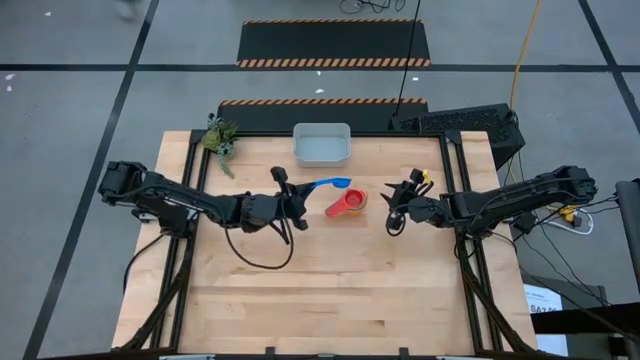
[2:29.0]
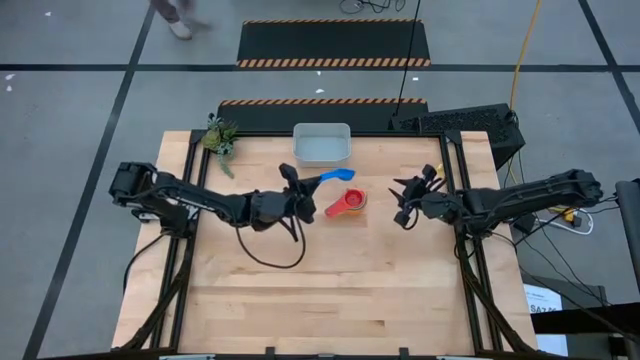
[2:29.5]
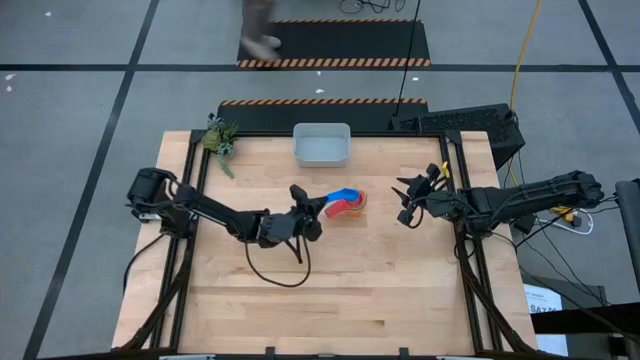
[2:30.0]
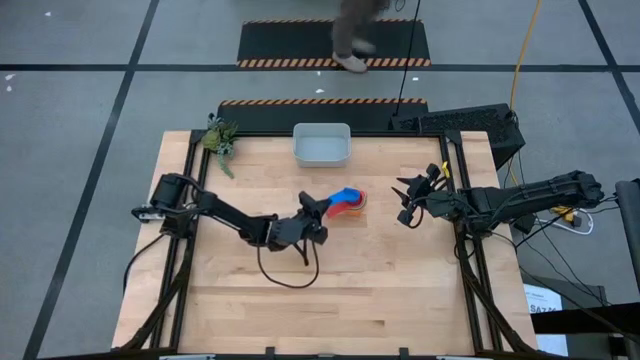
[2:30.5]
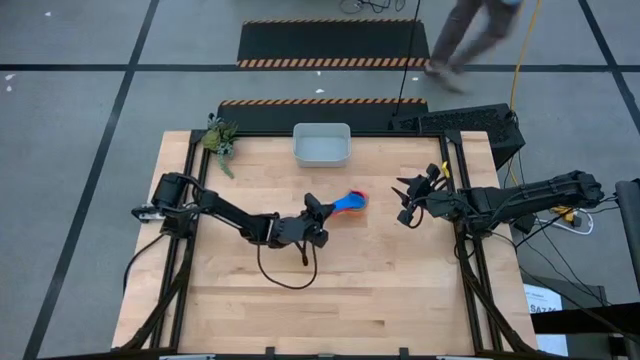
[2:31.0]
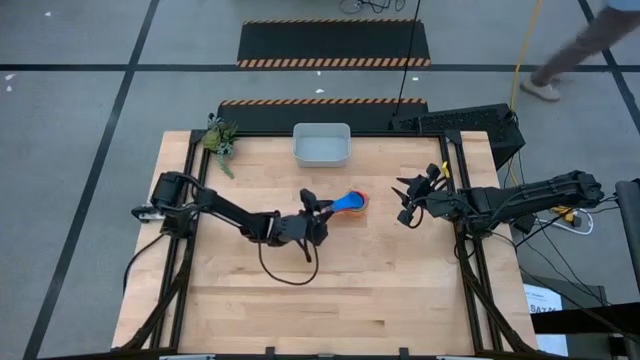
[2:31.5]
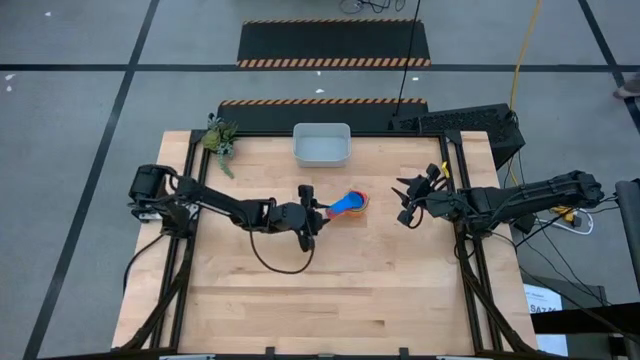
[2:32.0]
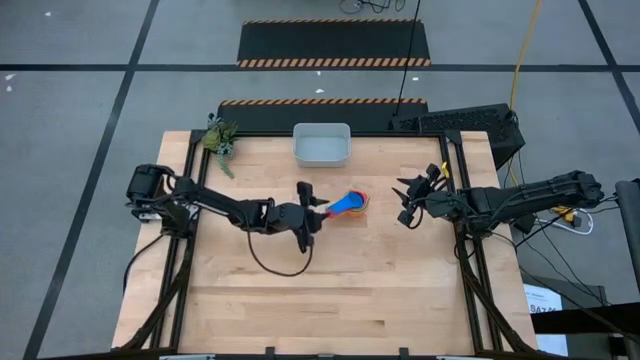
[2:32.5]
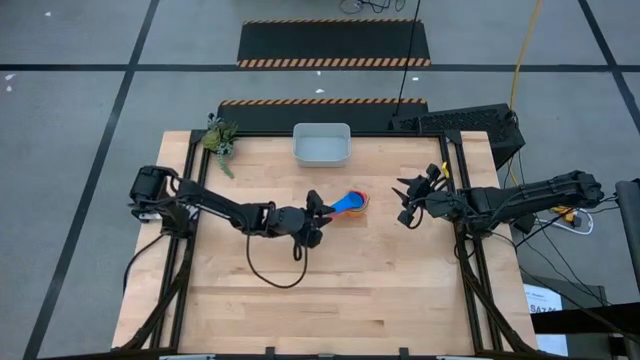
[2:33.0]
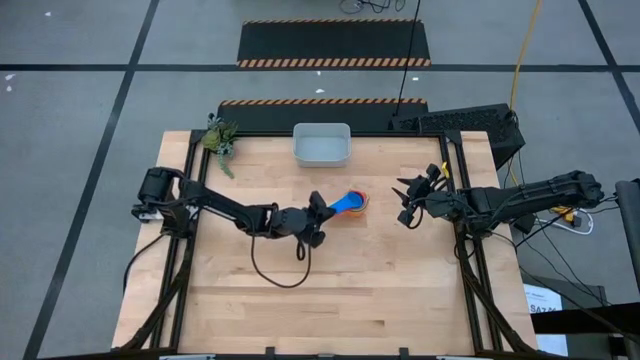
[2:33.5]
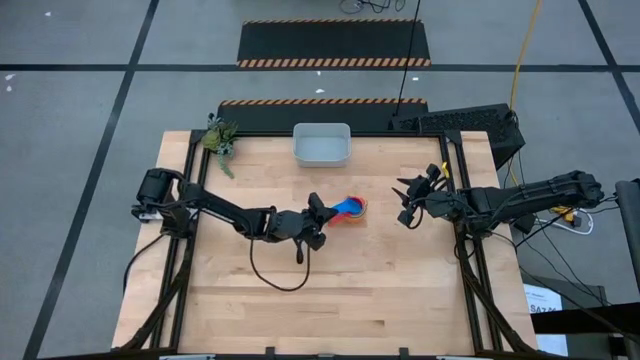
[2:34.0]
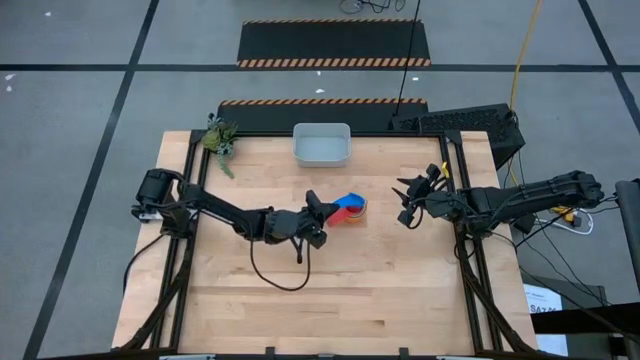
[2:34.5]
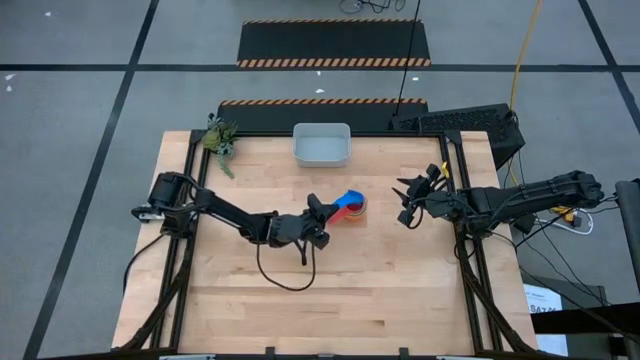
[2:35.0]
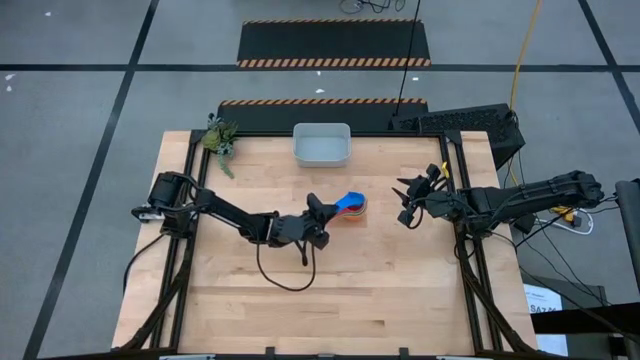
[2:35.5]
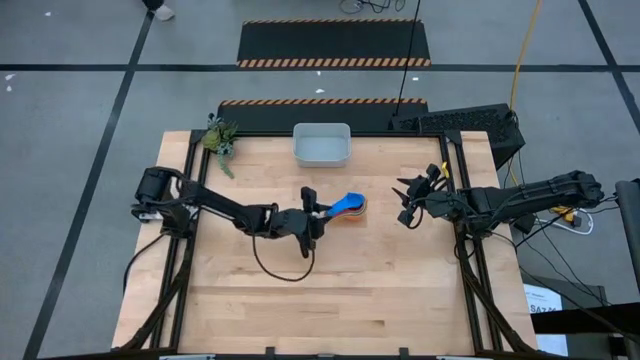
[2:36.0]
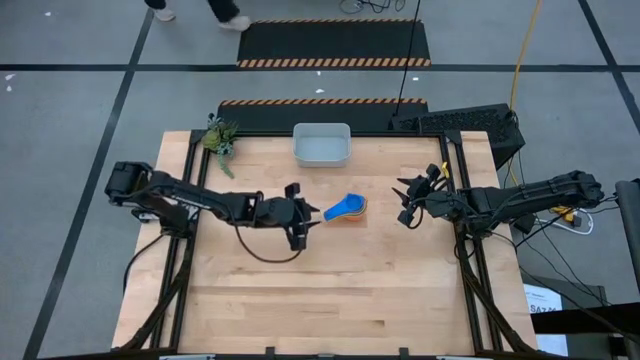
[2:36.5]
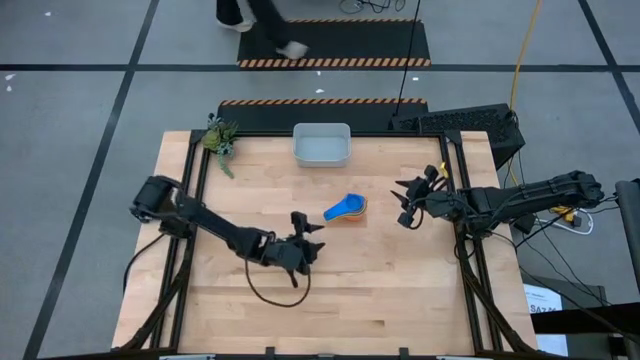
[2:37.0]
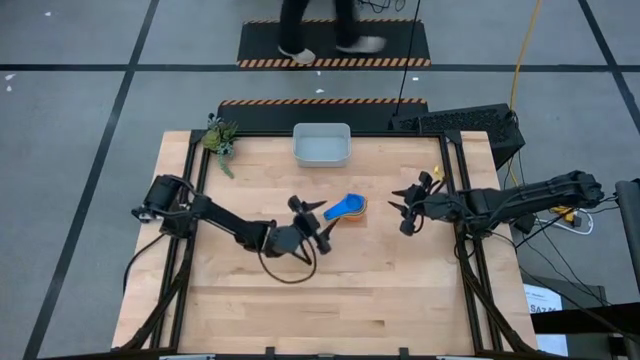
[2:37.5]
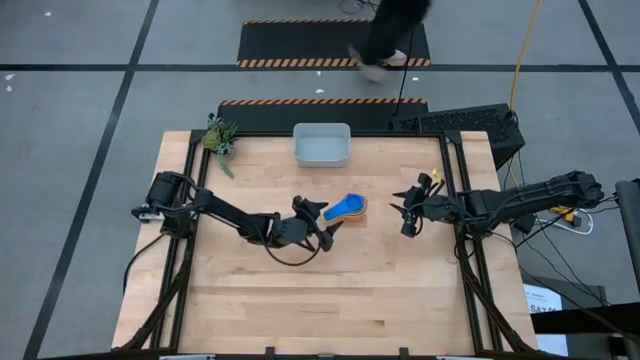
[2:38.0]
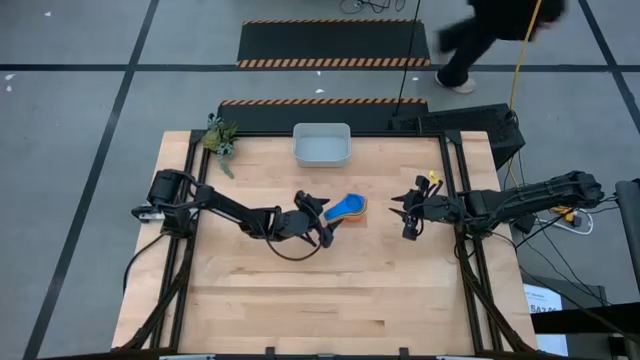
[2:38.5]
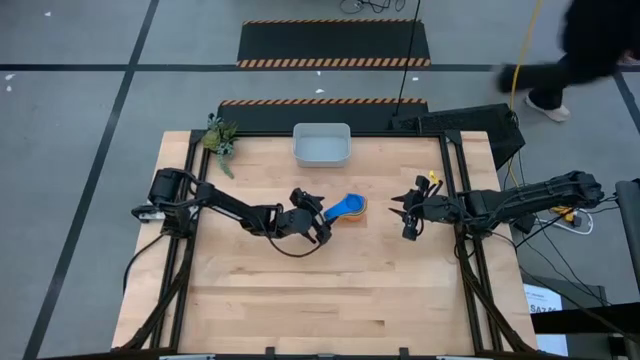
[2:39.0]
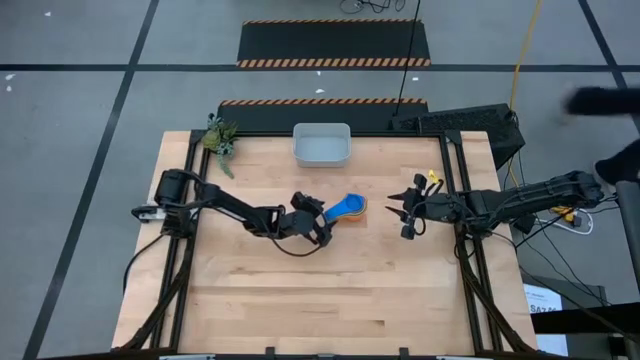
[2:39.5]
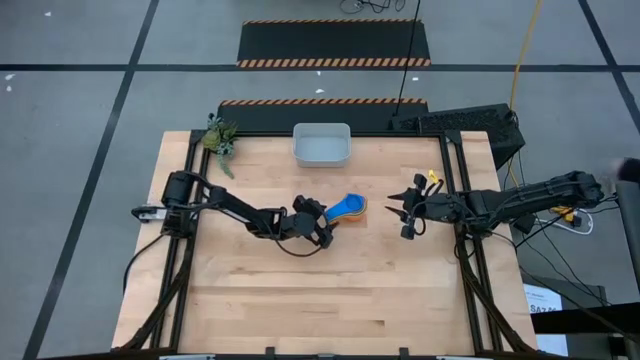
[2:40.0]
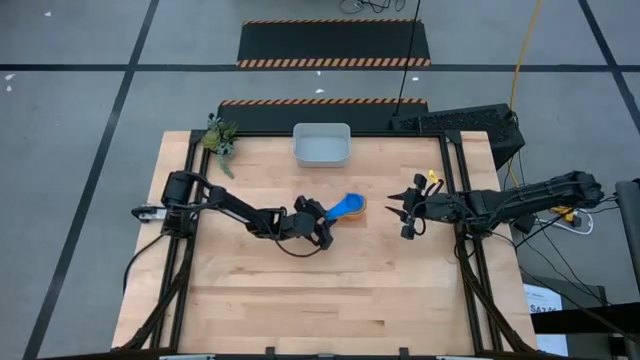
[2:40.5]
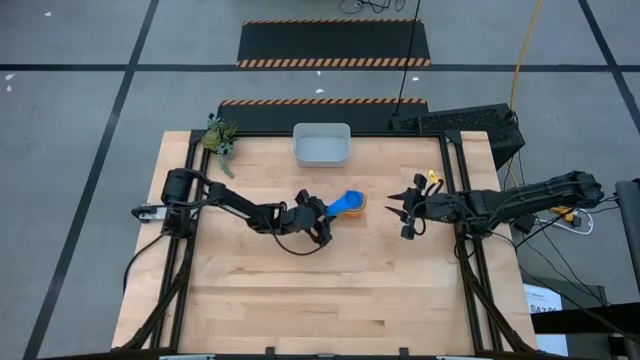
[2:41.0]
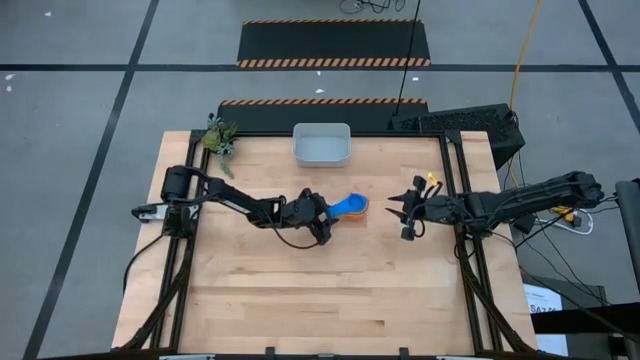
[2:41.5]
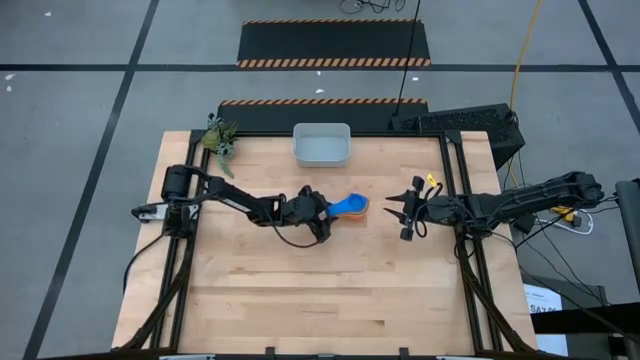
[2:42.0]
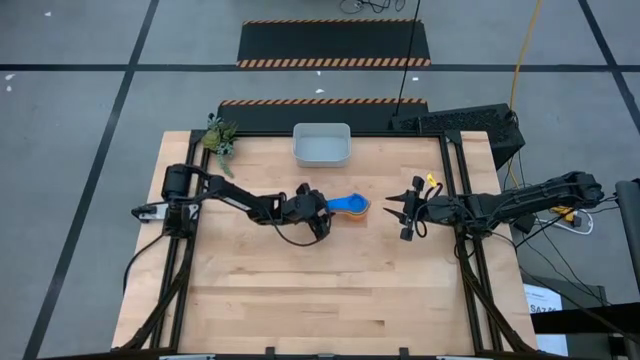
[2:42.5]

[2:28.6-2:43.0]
Task: Nest measuring cups in basket
Stack the blue measuring cup into the red measuring cup

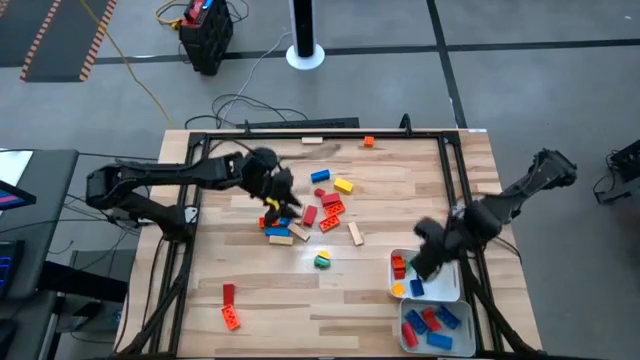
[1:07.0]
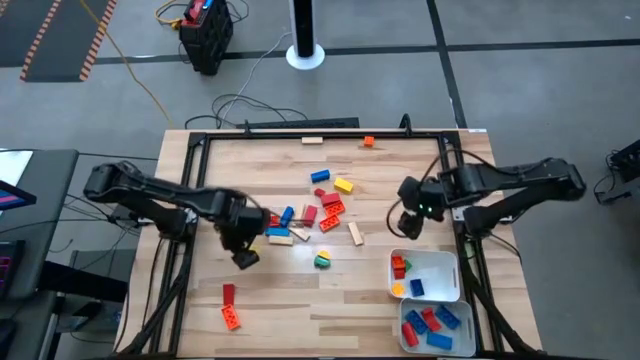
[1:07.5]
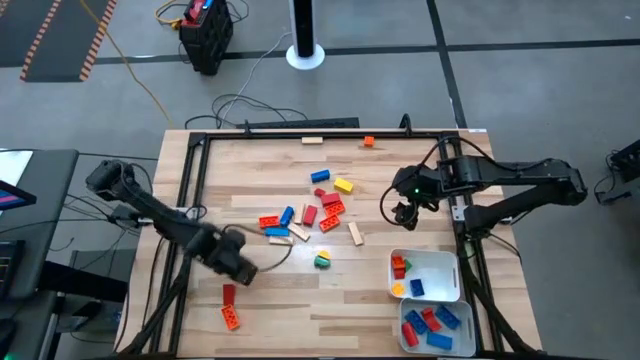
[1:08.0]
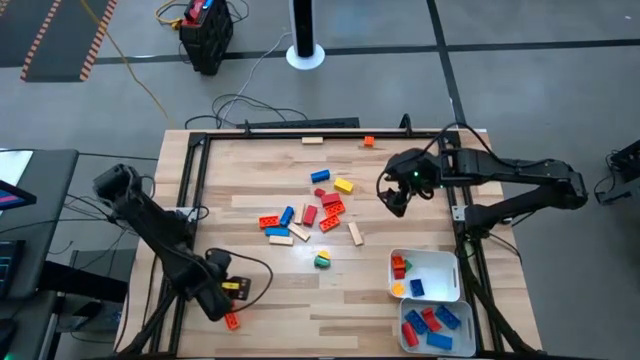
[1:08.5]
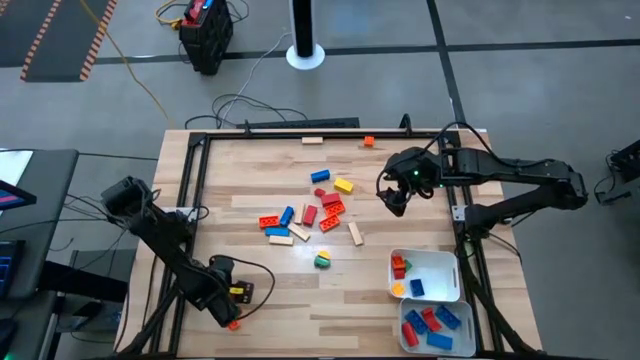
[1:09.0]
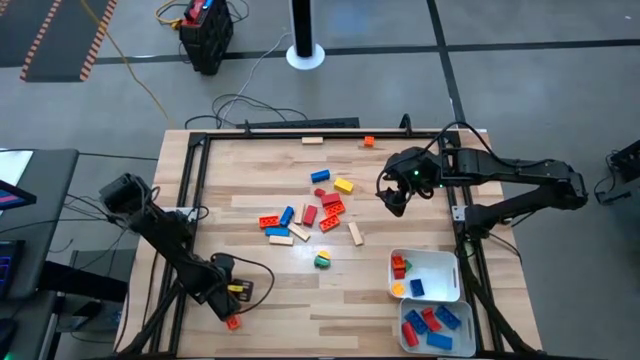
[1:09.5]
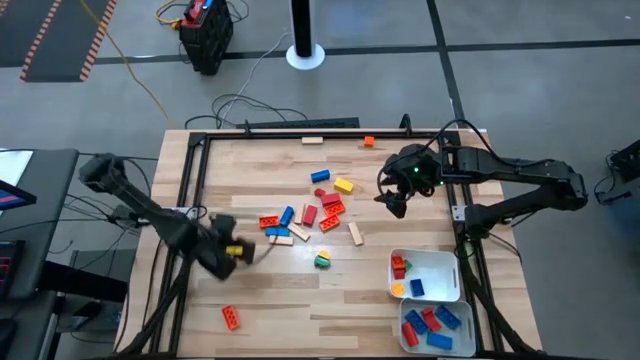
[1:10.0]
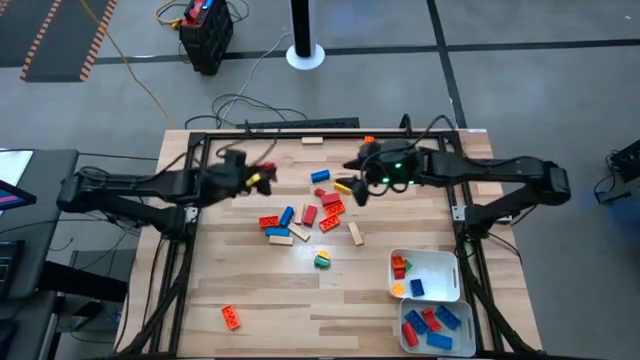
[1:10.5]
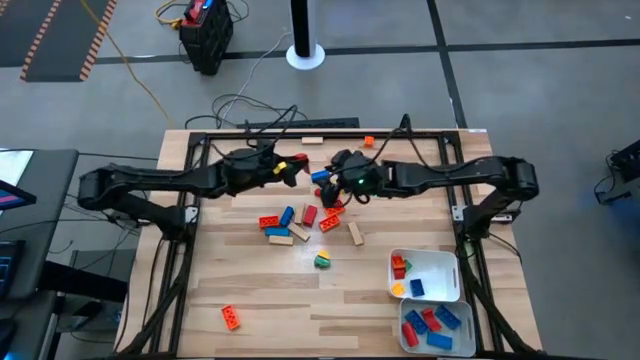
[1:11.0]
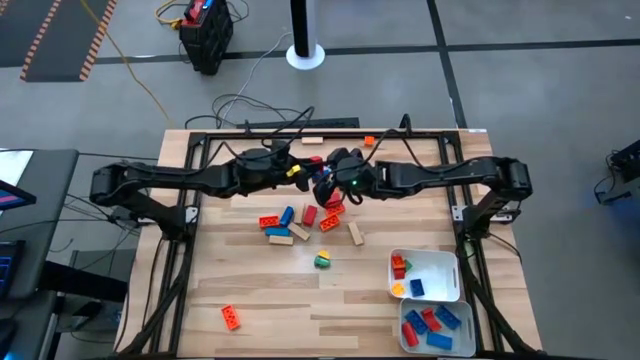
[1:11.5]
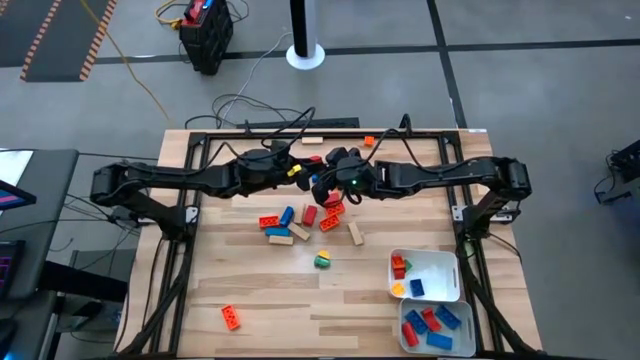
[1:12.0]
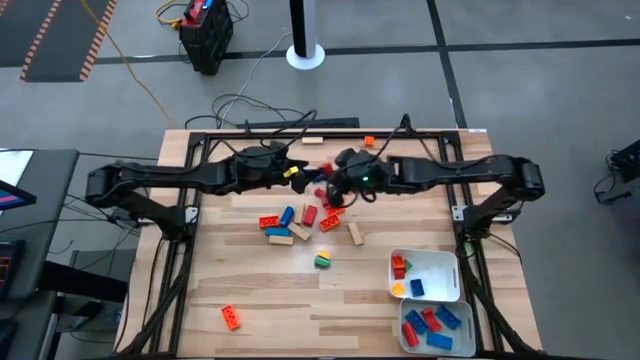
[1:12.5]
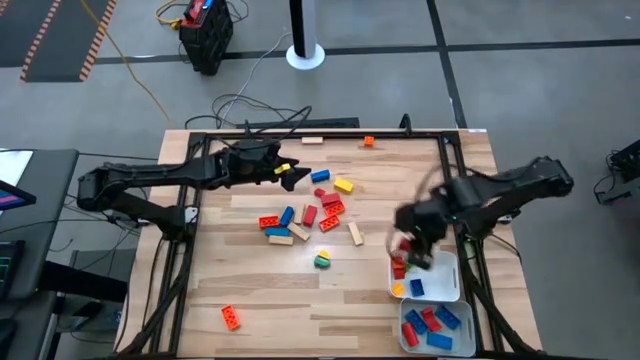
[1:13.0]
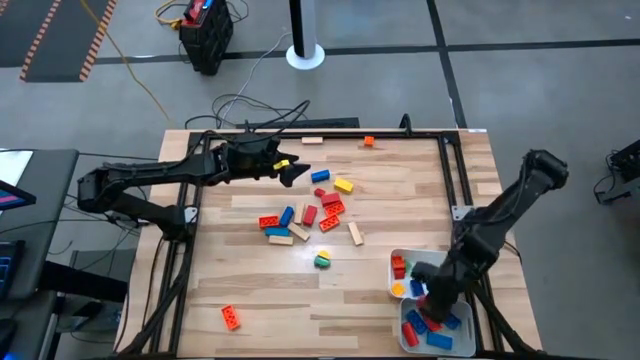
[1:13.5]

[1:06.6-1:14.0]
Task: Sort blocks by size
Put the big red block into the gray bin

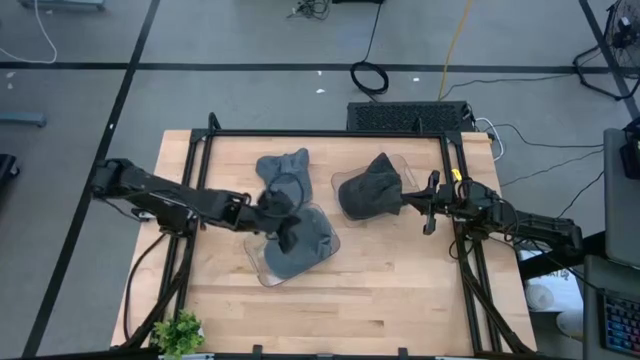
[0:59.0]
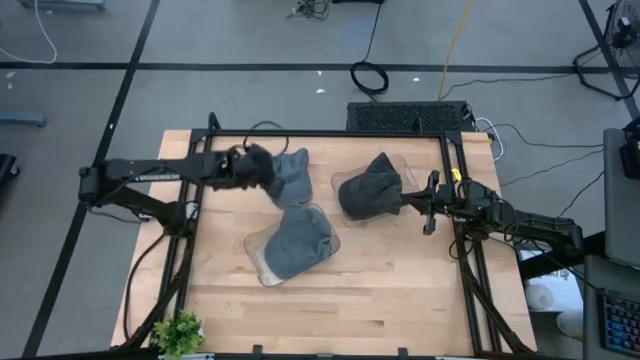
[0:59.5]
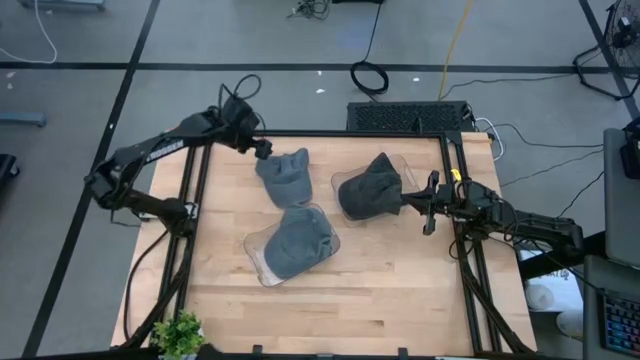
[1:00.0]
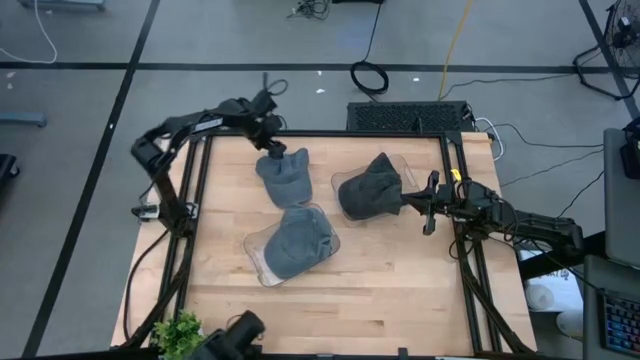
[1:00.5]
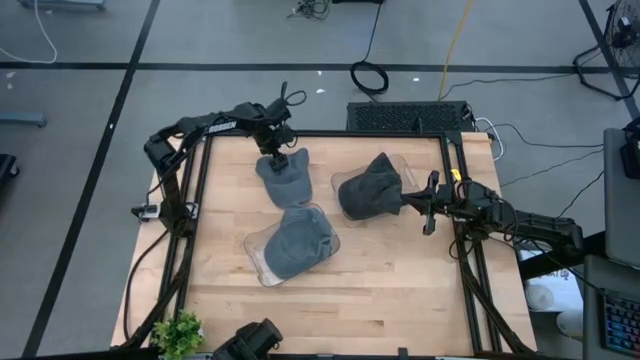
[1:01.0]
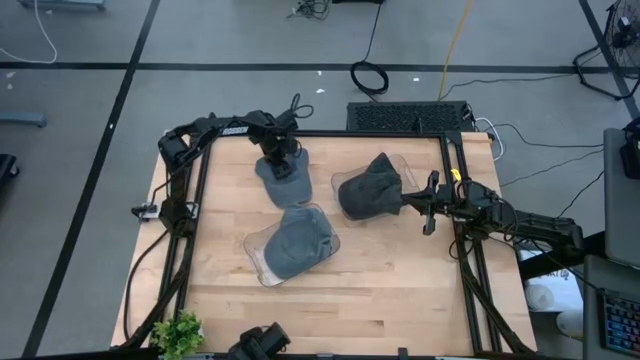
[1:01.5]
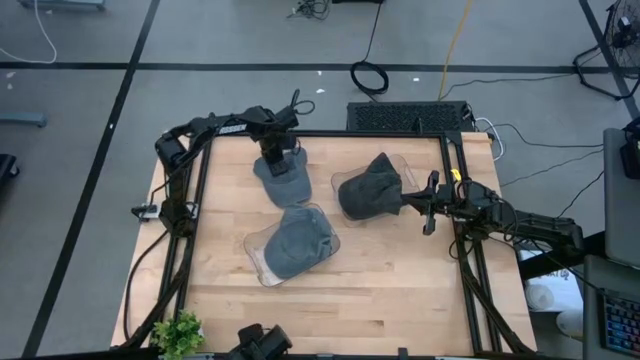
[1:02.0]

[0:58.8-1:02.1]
Task: Pick & Place hat
Put the blue cap into the bottom transparent bin
